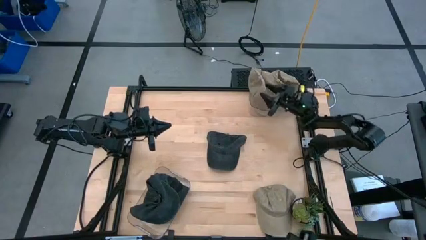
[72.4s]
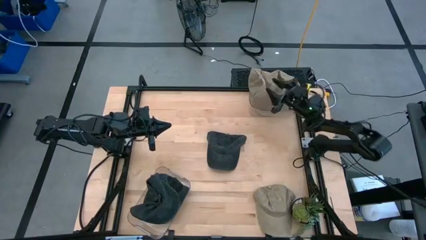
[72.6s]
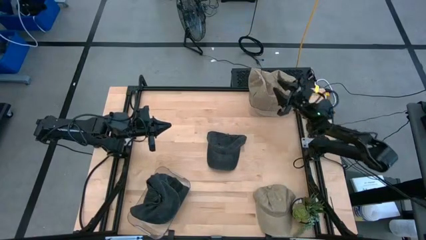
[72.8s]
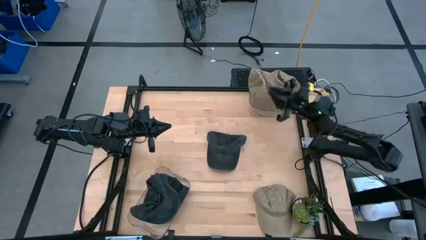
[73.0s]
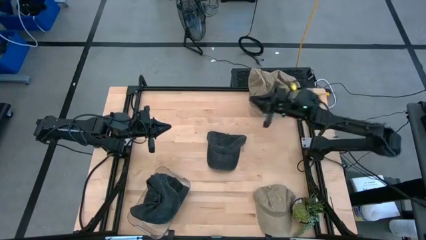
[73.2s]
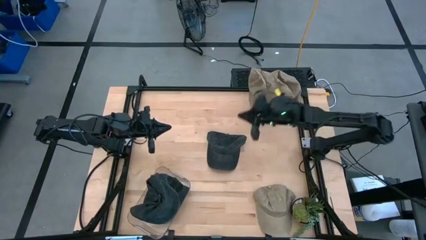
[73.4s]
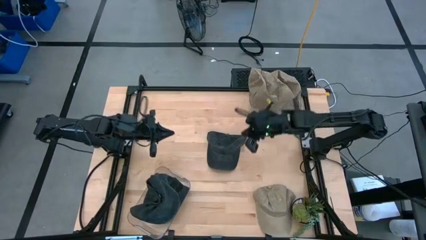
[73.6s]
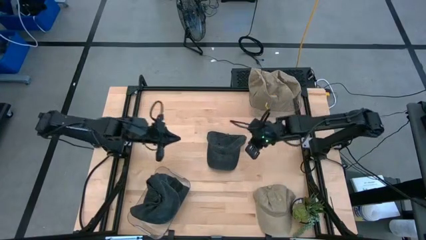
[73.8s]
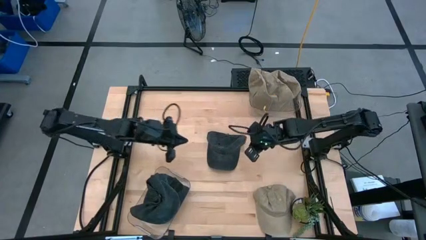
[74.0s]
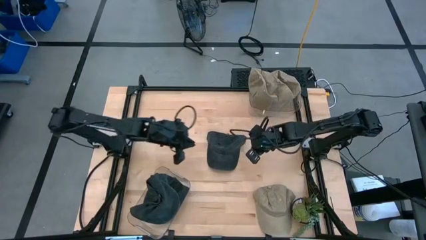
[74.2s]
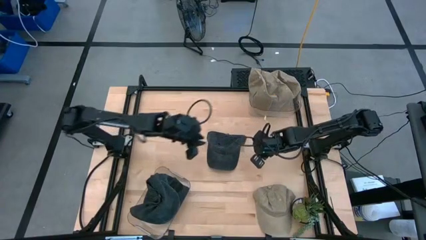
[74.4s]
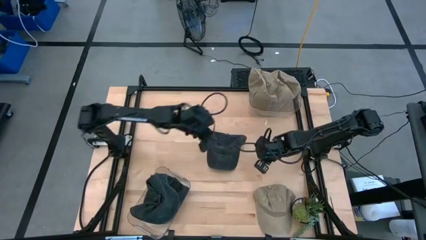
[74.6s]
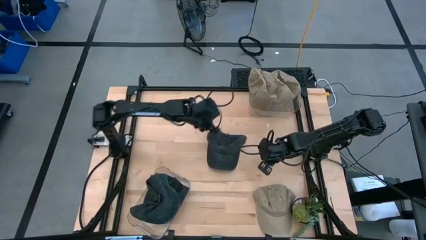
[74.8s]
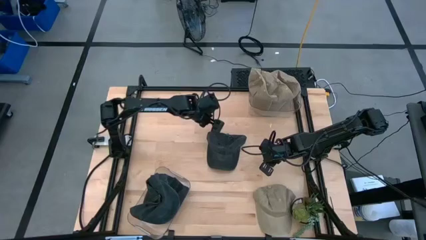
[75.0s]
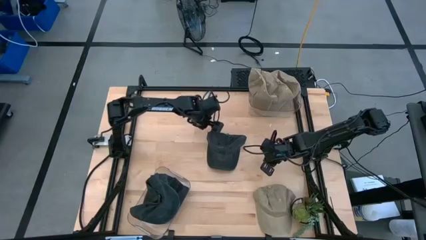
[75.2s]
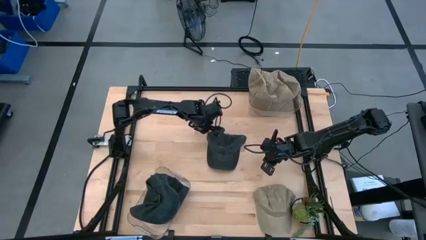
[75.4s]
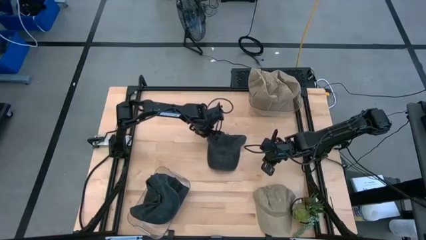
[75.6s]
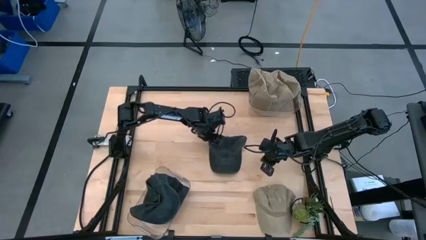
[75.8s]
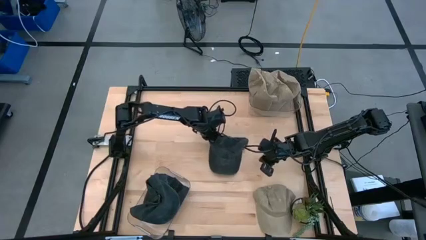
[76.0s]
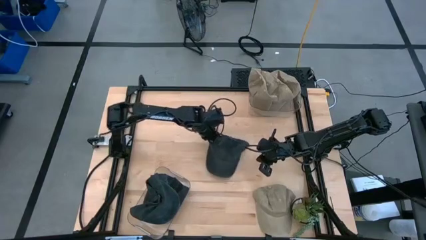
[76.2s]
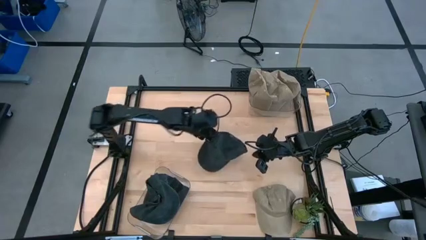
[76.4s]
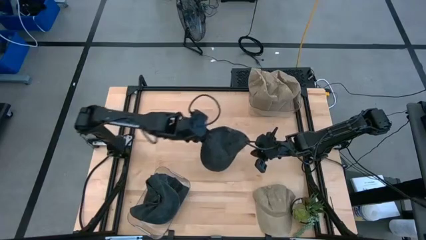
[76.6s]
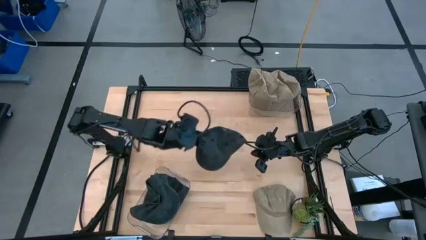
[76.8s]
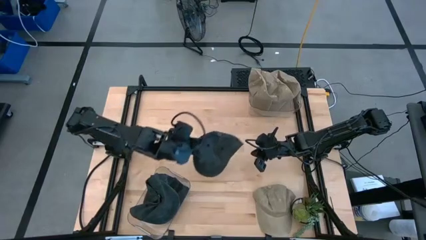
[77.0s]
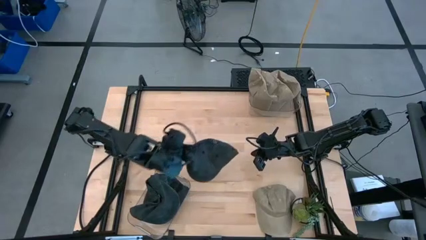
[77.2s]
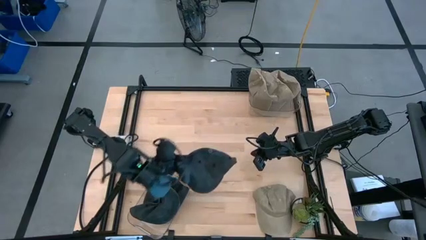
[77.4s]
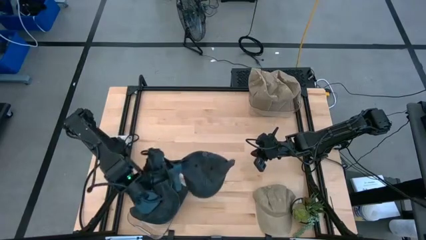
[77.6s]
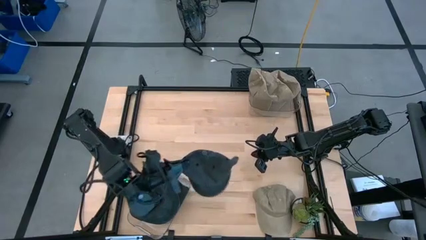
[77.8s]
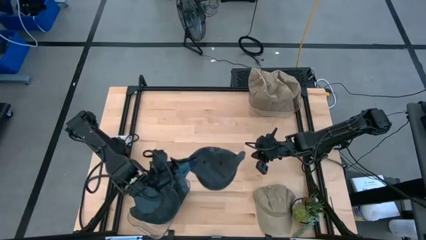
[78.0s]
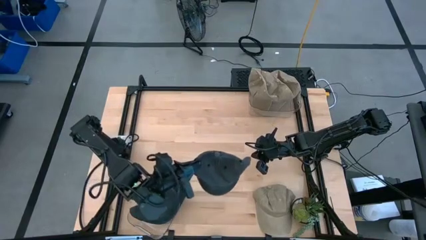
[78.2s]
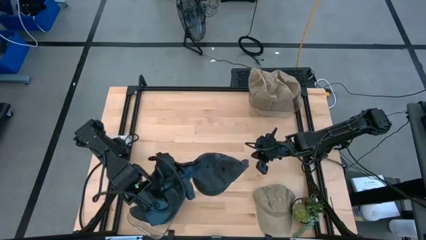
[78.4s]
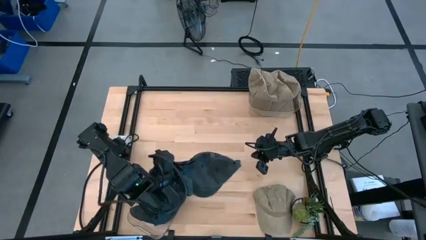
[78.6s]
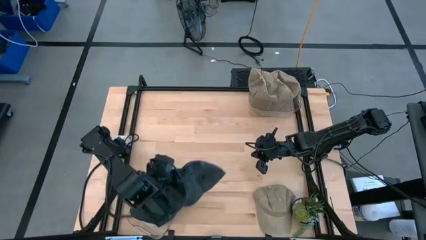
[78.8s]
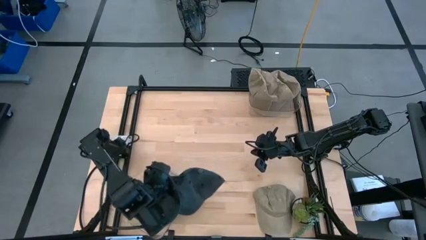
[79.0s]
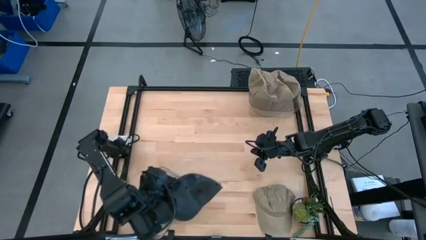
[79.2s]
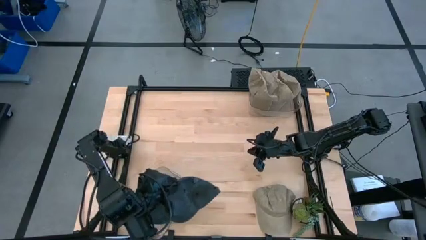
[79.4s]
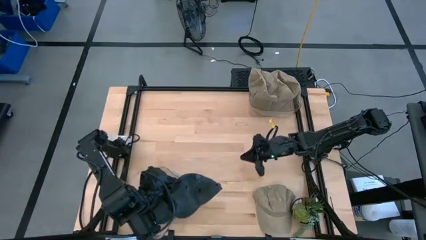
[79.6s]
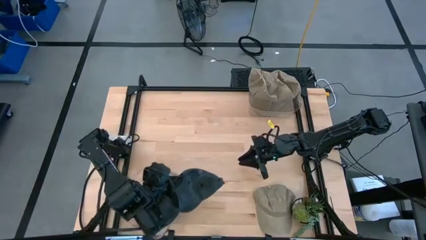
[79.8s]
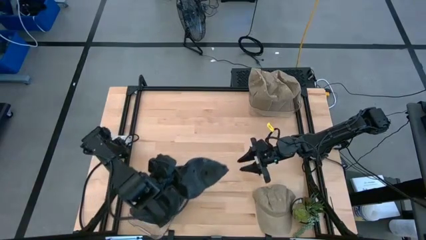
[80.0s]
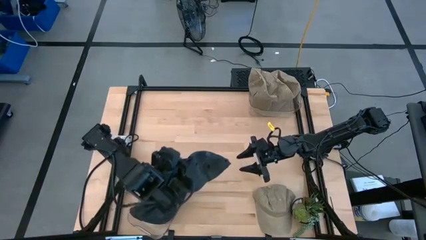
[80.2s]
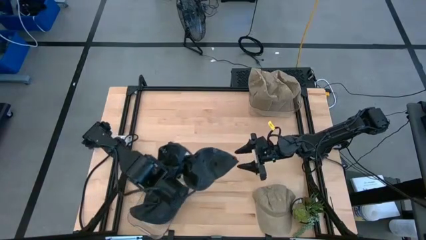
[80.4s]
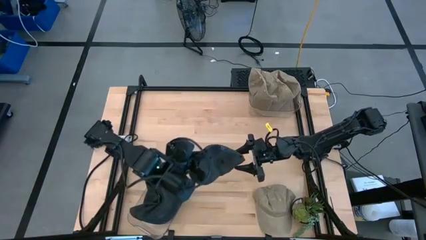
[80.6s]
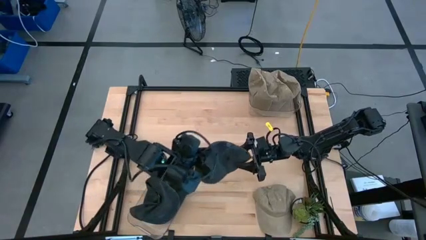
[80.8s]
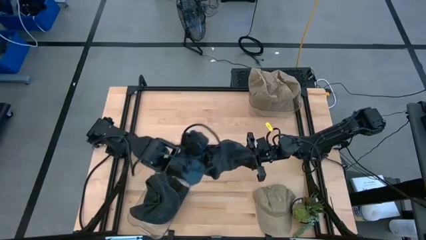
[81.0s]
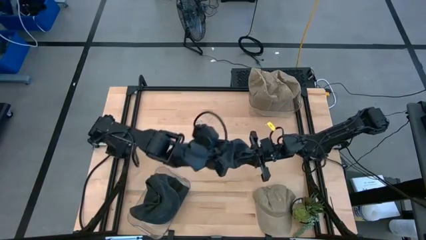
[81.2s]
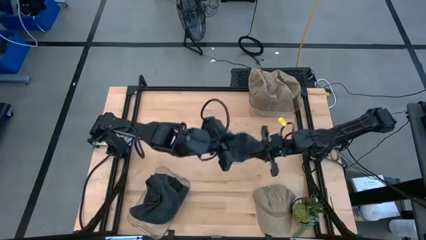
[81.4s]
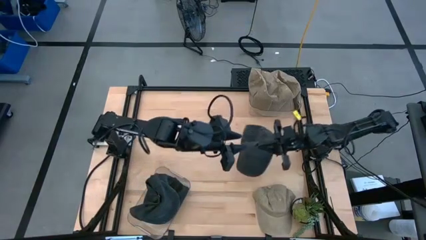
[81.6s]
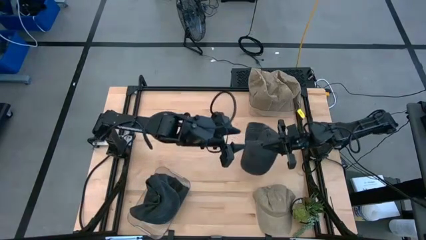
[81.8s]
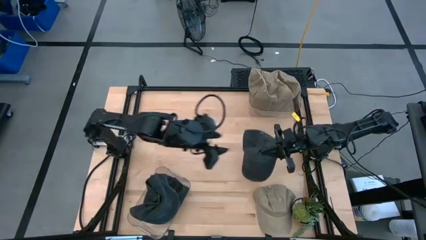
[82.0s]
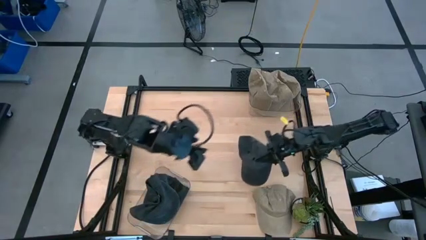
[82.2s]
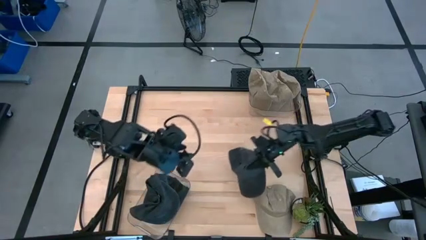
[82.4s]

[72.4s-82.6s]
Task: Pick & Place hat
Put the black cap into the bottom transparent bin

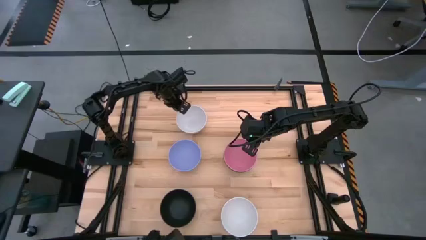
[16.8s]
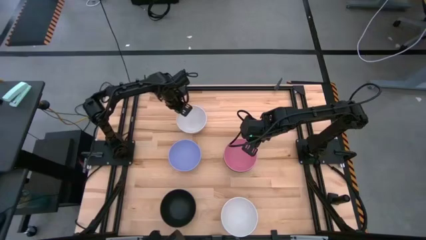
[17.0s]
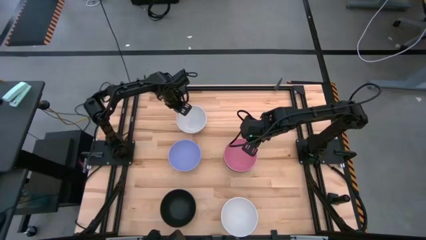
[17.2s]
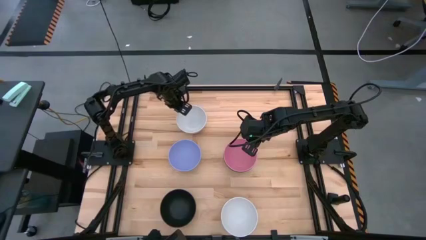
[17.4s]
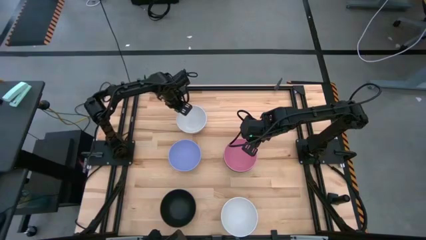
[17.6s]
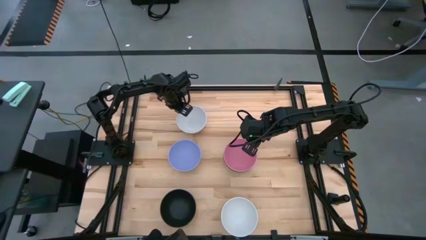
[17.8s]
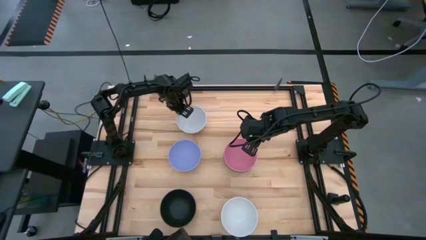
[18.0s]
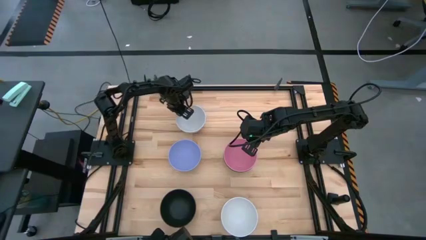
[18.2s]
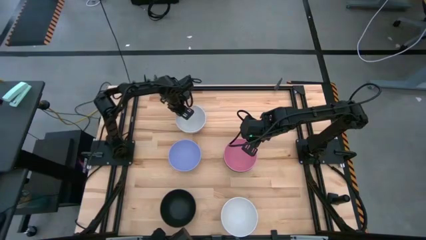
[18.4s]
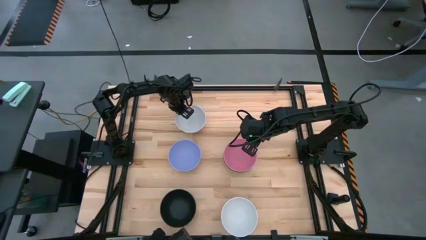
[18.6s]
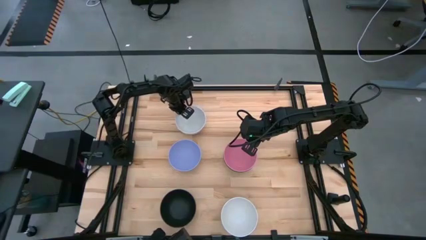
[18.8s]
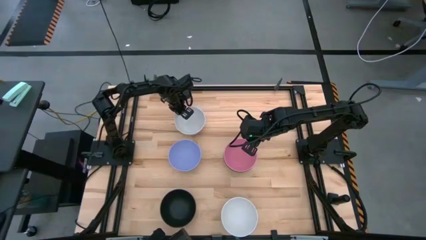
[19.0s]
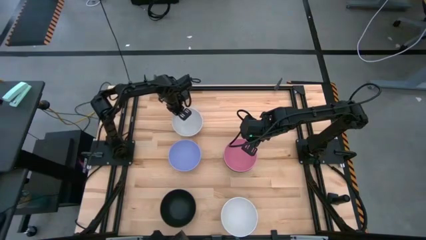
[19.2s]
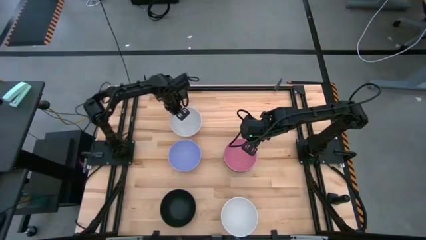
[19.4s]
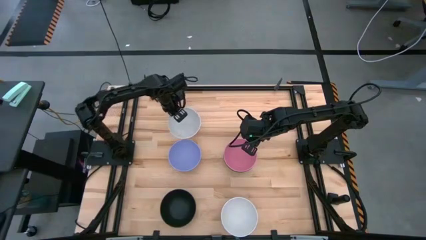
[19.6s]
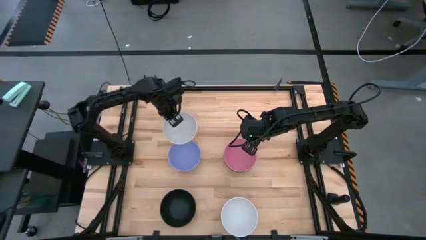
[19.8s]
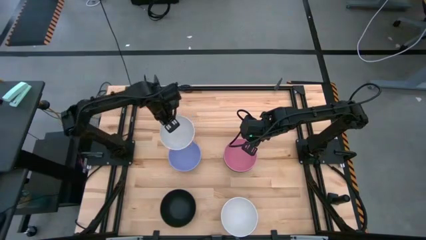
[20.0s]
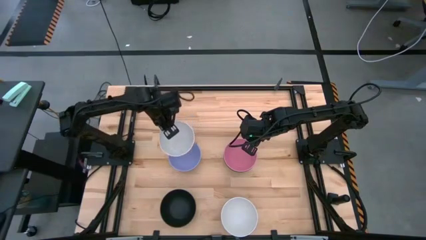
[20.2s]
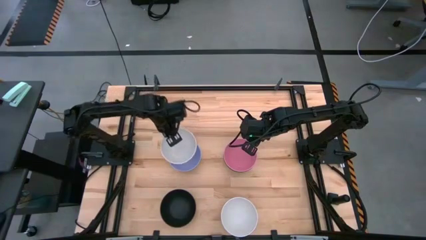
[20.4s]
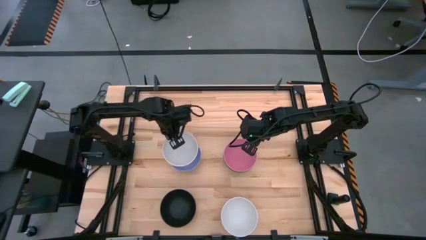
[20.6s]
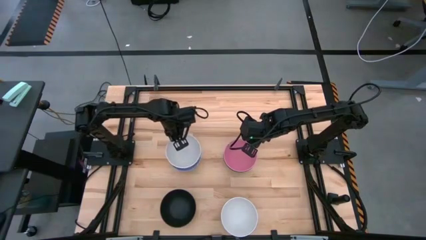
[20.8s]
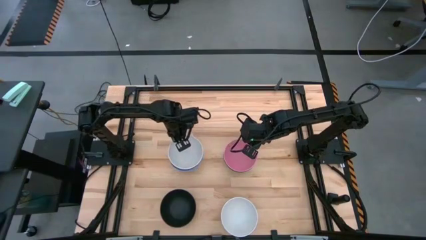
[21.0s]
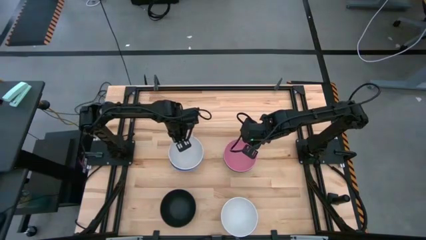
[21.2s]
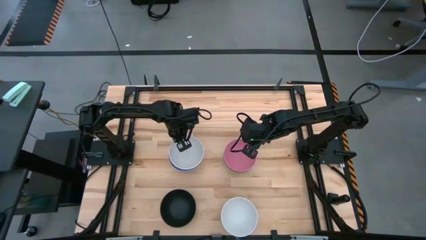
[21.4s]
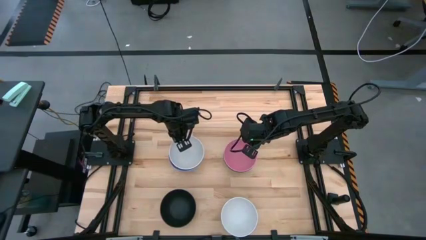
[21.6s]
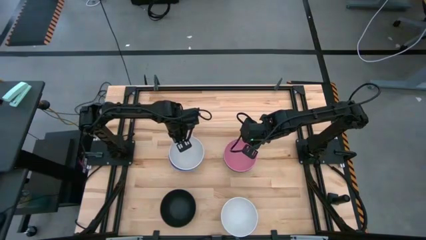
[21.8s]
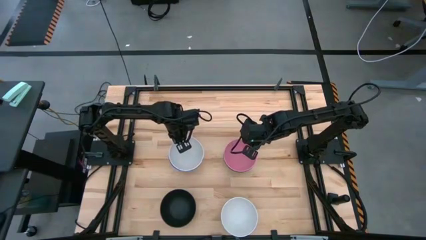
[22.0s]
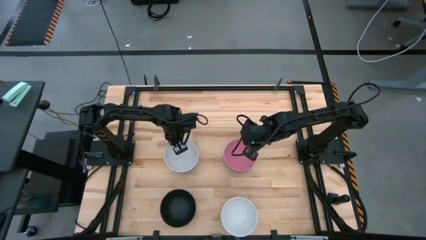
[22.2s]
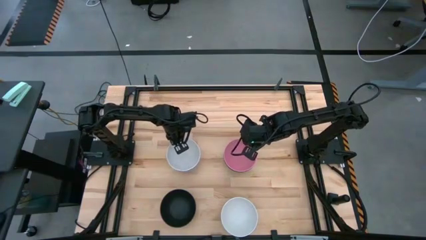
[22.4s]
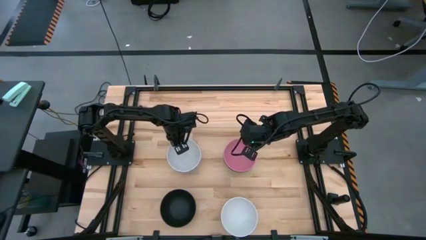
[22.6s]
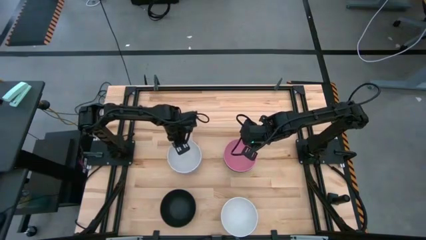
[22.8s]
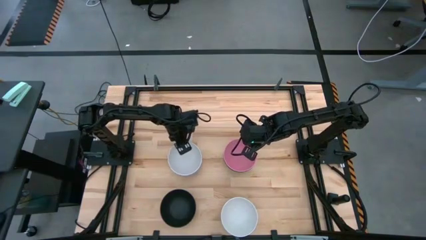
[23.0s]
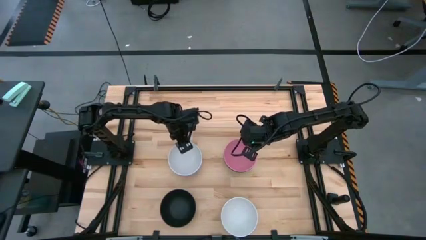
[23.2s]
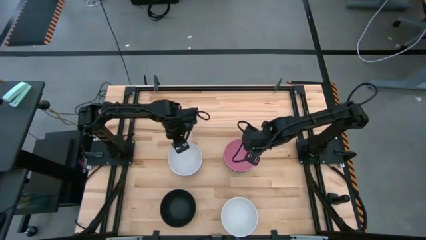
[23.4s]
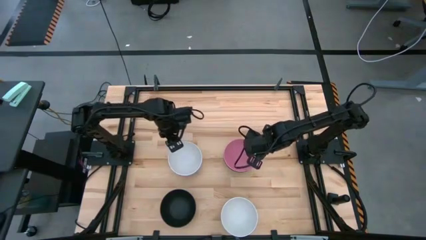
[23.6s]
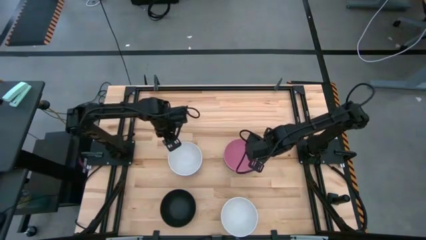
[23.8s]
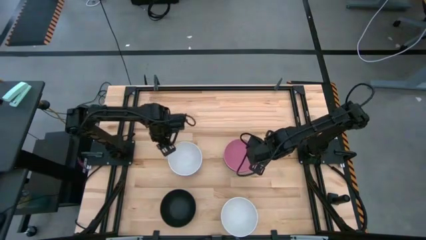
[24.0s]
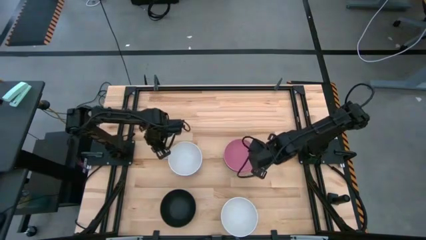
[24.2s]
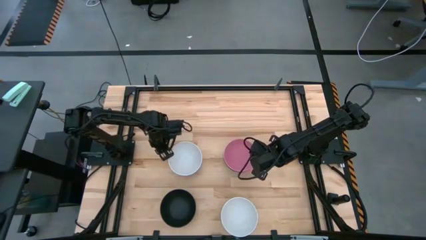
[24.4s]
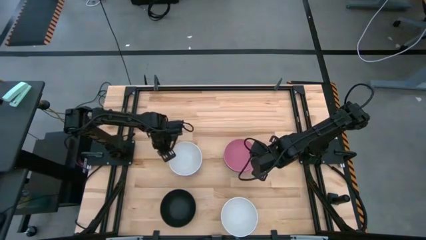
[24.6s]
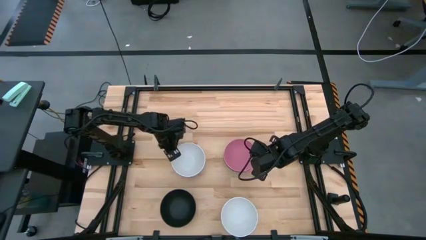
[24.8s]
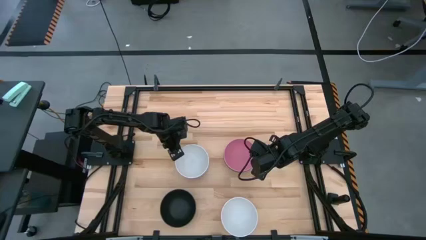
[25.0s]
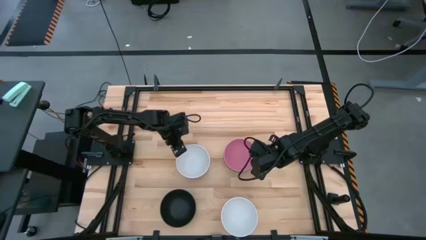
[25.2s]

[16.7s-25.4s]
Task: Nest bowls inside each other
Stack the top white bowl on top of the purple bowl
